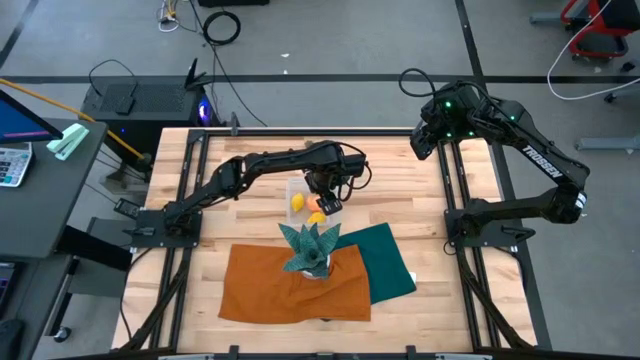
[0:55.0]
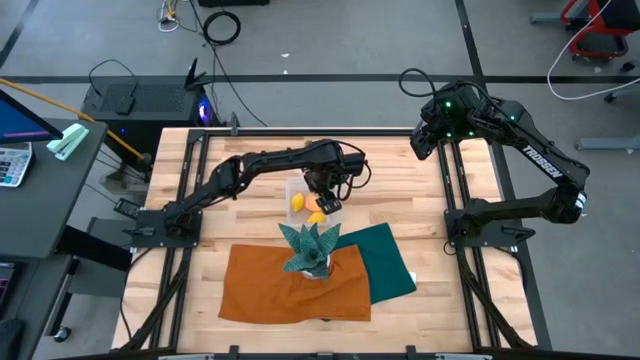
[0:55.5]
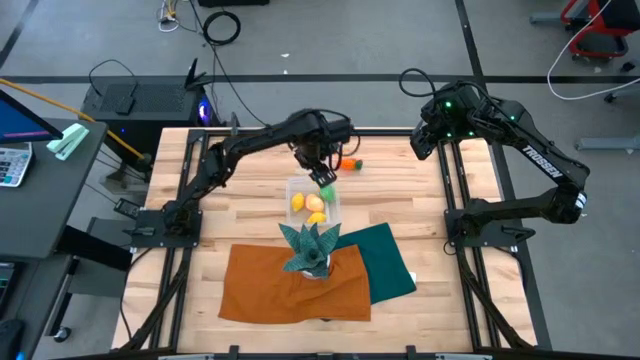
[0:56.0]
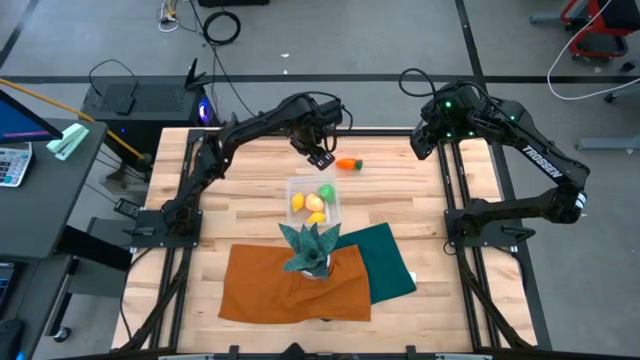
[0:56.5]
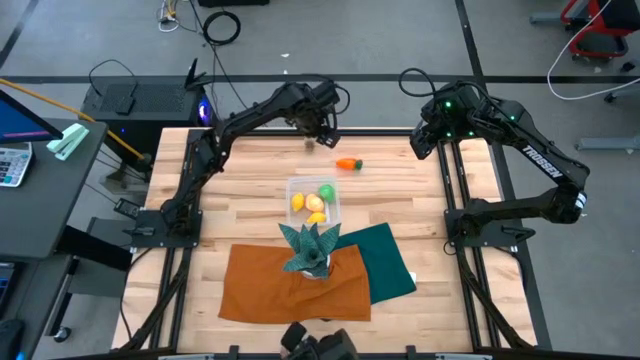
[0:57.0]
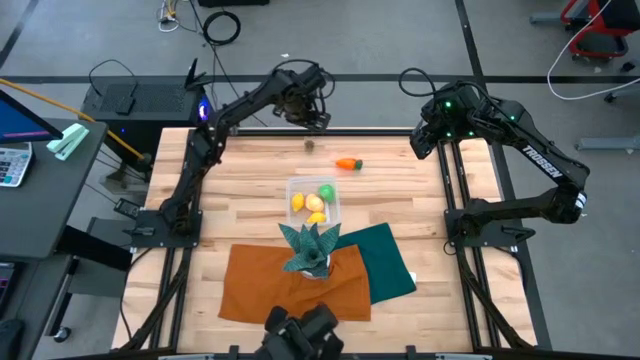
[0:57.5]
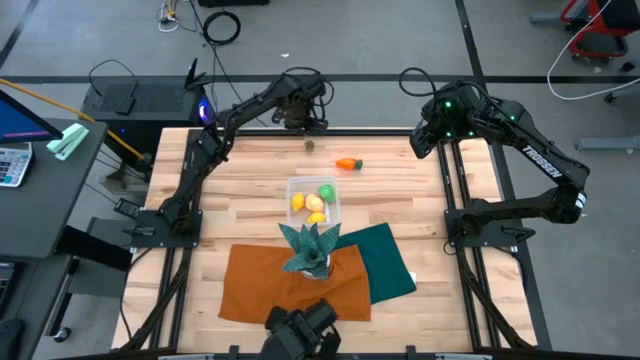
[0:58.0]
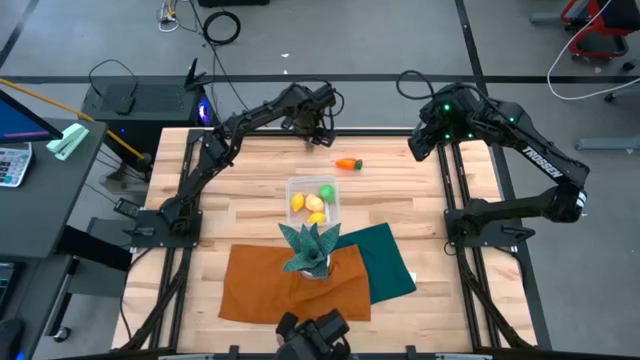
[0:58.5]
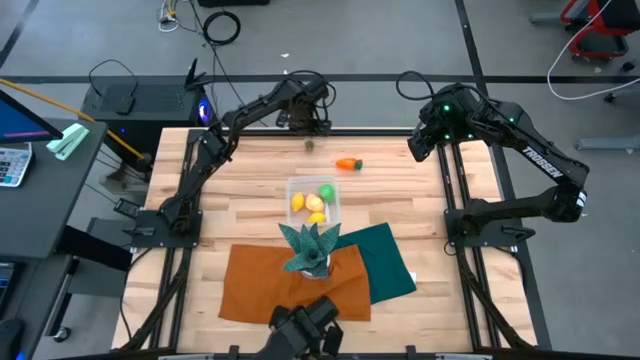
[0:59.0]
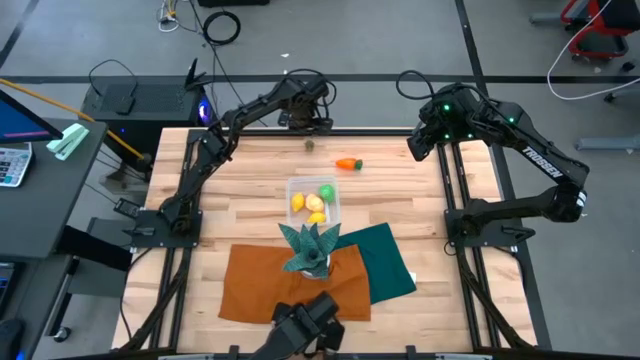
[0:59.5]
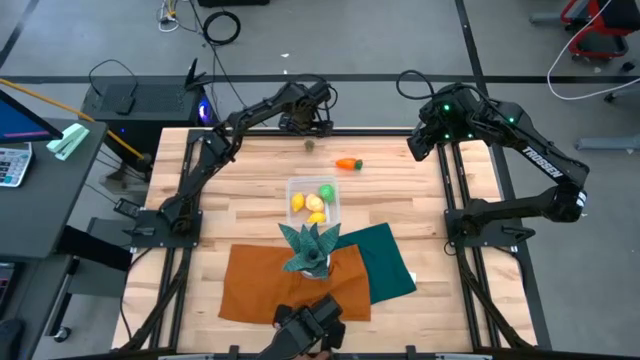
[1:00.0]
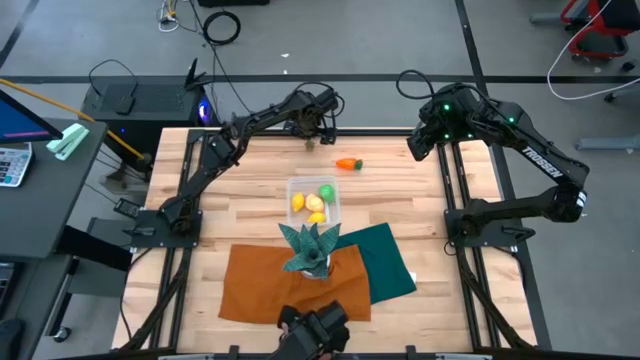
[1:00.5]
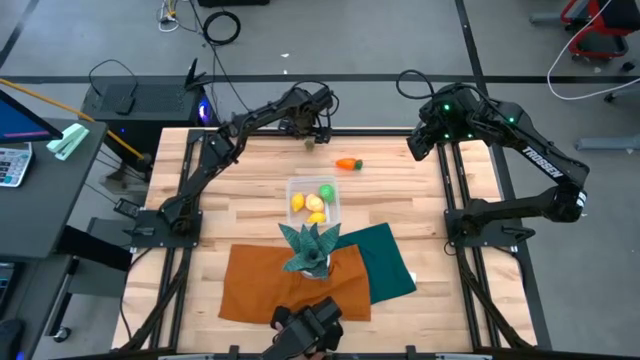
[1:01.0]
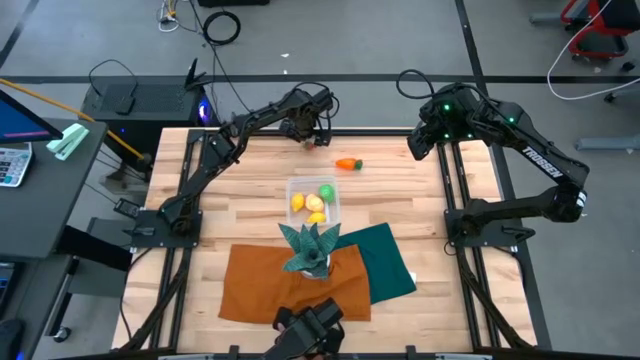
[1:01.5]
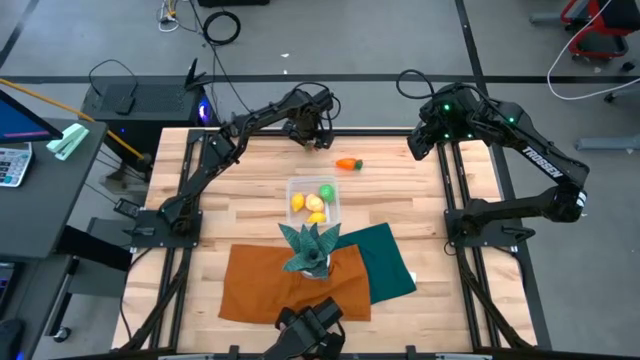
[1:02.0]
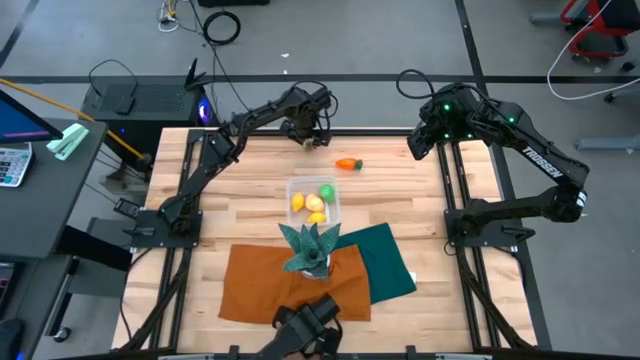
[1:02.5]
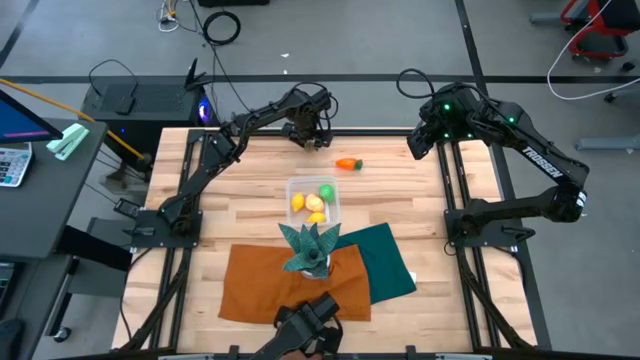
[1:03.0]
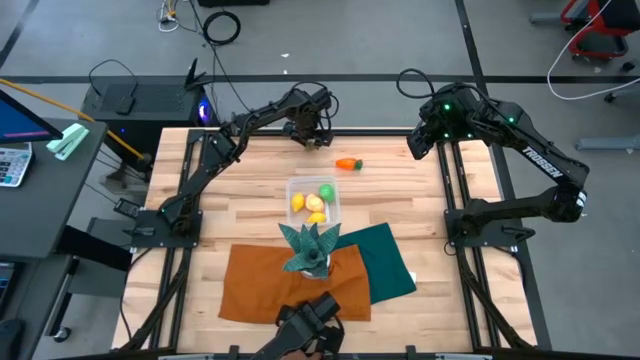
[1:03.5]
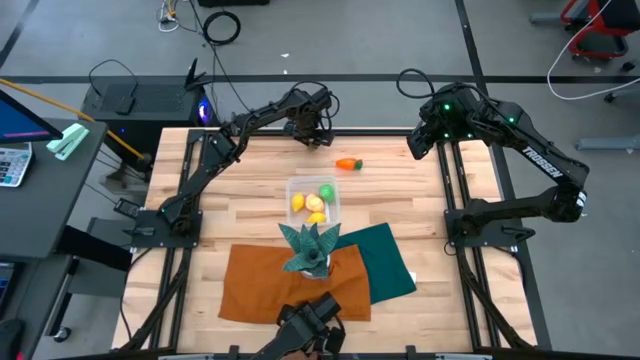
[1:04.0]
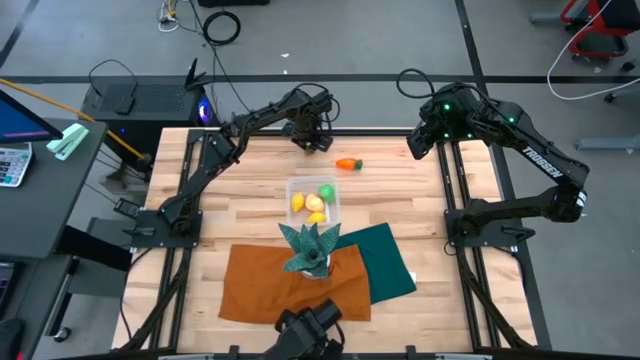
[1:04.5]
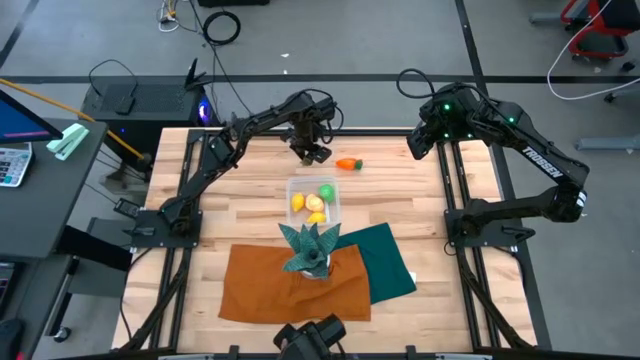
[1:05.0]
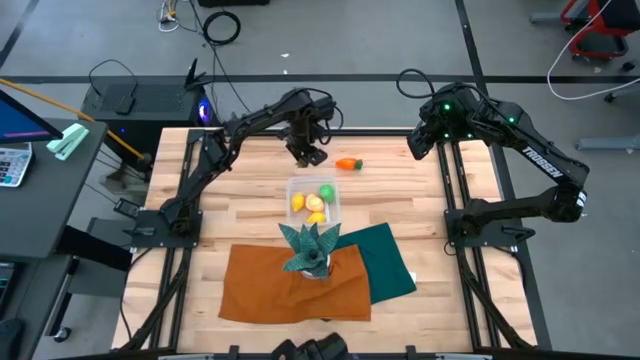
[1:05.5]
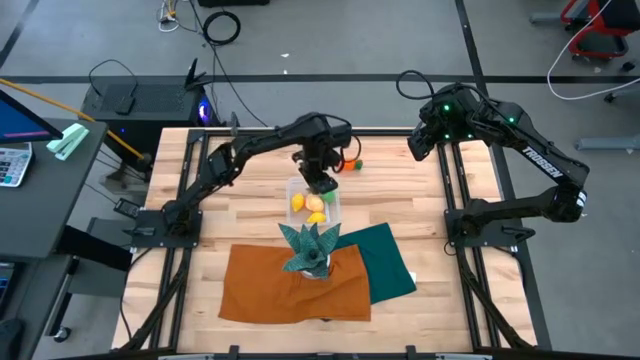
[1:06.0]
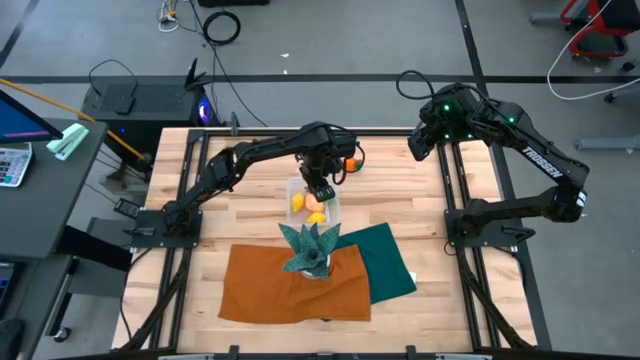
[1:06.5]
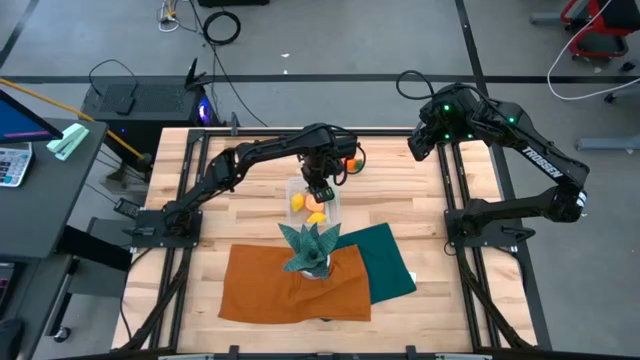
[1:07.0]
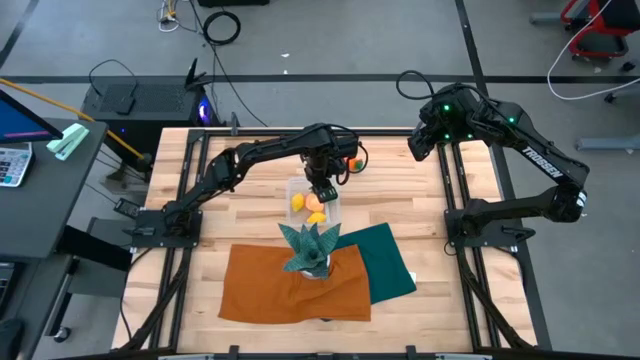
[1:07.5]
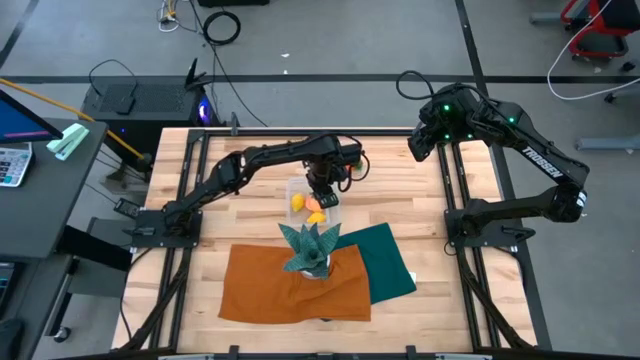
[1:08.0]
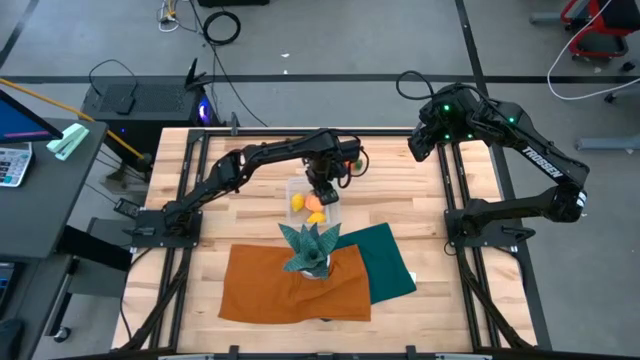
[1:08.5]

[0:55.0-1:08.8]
Task: Pick and placing Produce into tupperware
Put the red strawberry into the transparent bin

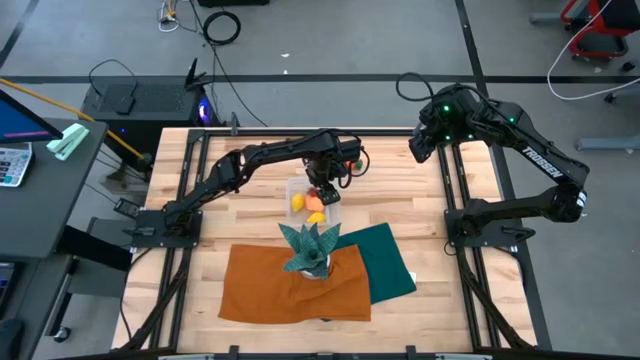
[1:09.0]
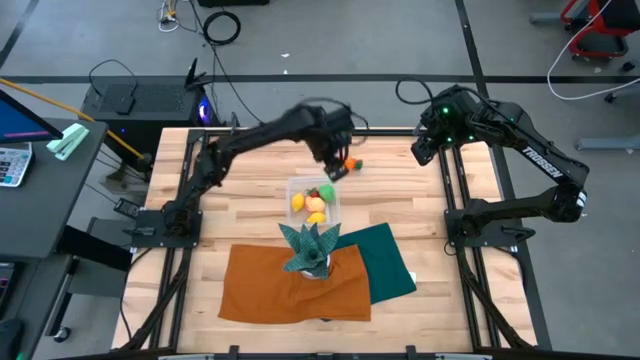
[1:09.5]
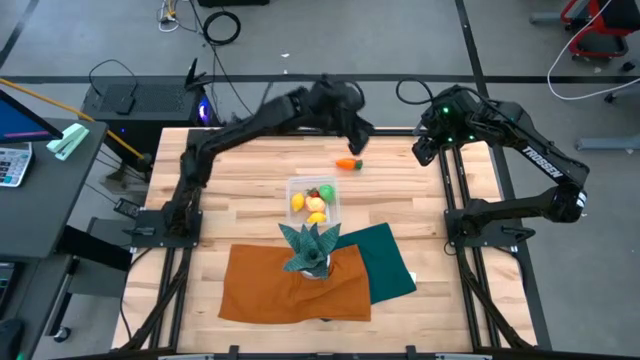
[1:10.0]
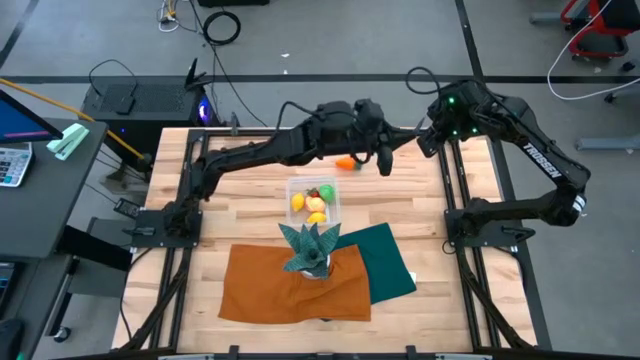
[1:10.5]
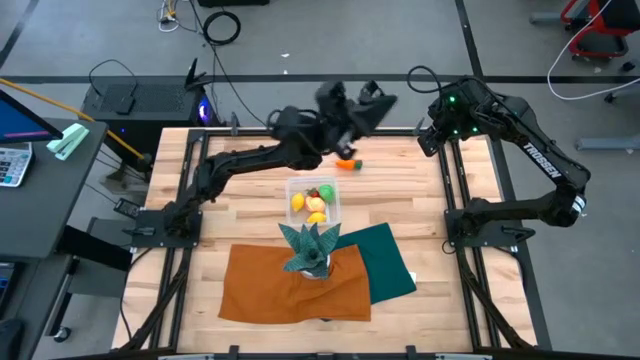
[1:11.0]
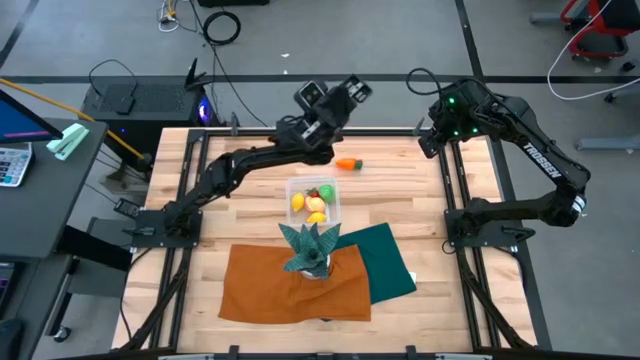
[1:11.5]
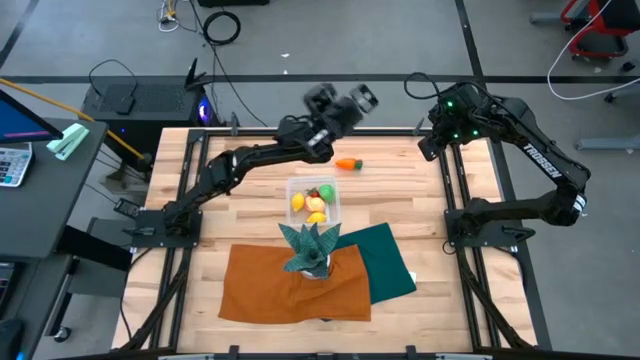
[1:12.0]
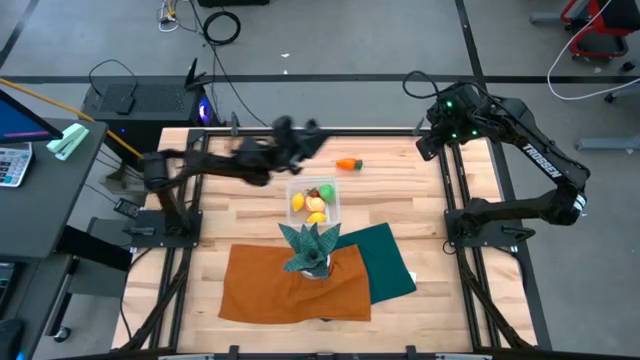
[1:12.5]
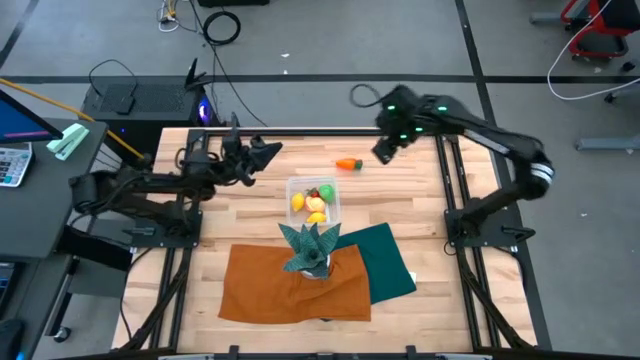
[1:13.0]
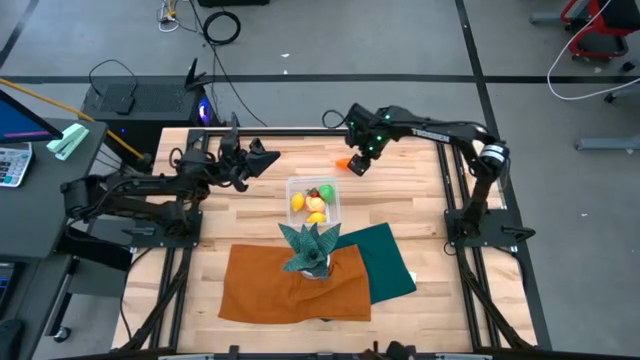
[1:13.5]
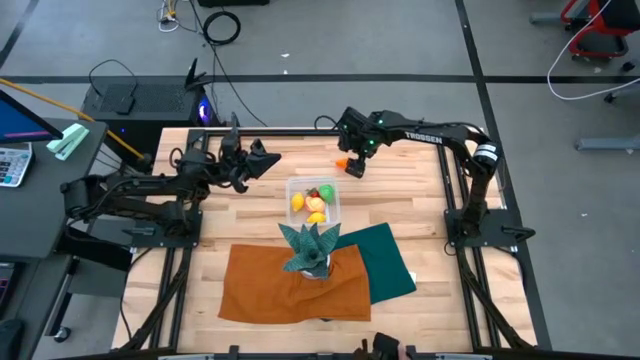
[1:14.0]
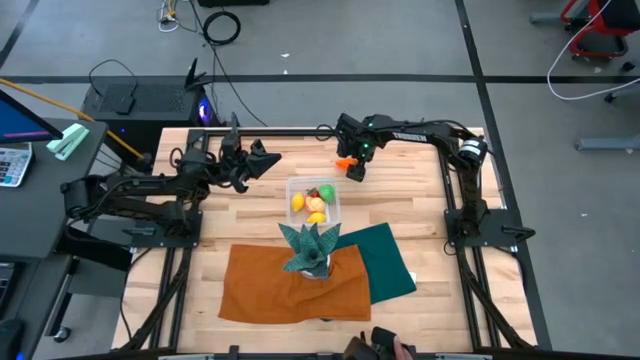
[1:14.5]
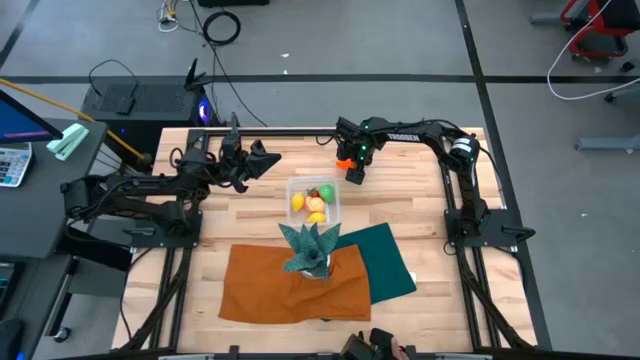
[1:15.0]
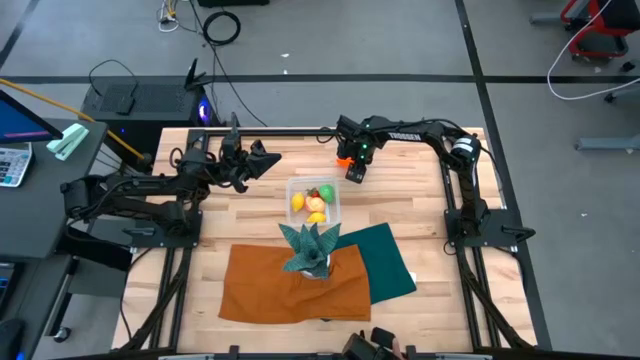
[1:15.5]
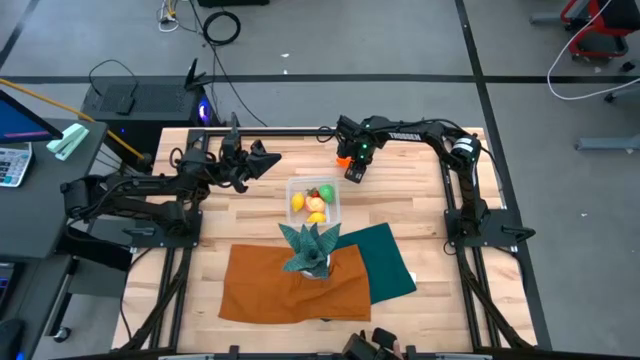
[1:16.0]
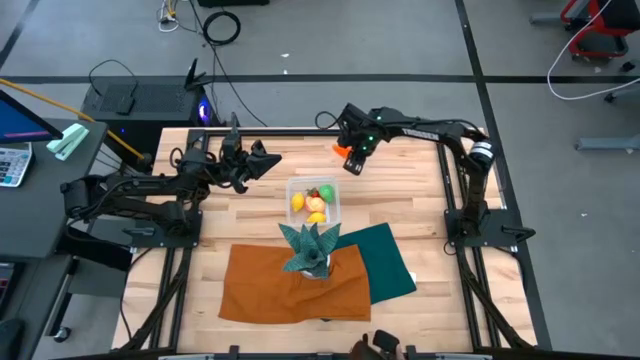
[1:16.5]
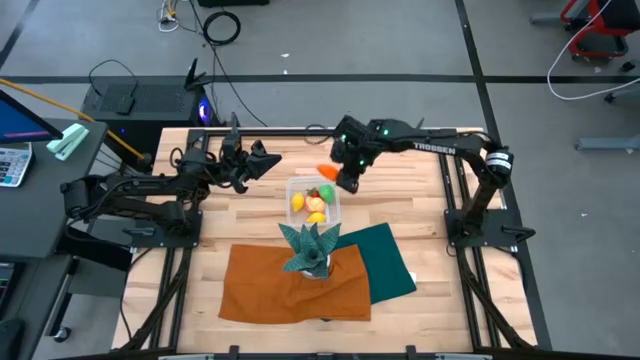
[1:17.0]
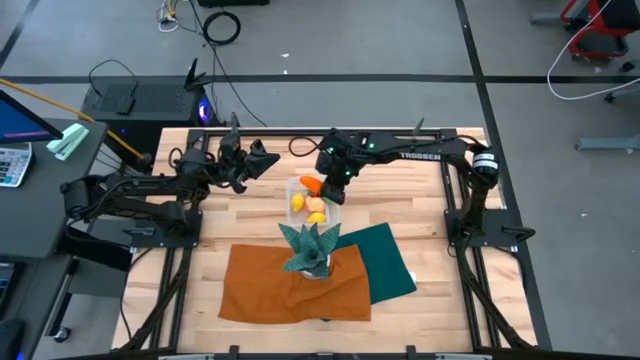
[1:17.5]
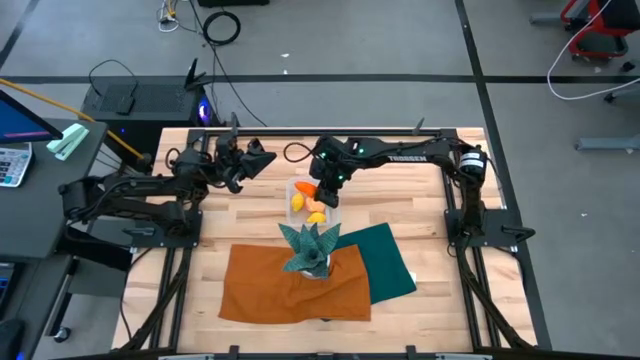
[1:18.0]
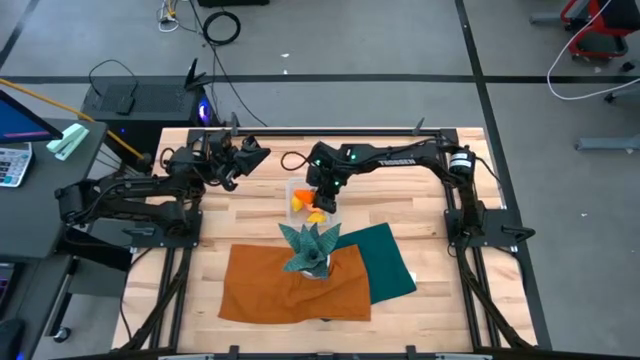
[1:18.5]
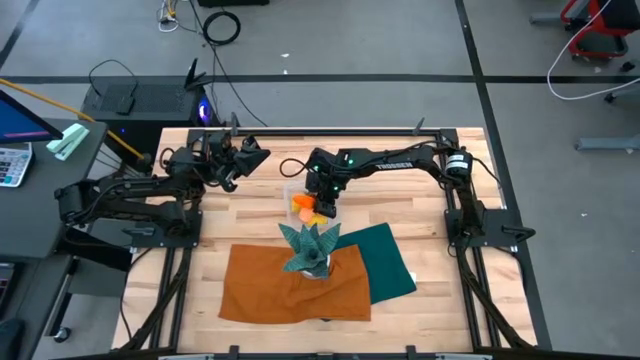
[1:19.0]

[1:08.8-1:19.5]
Put the orange carrot into the transparent bin
